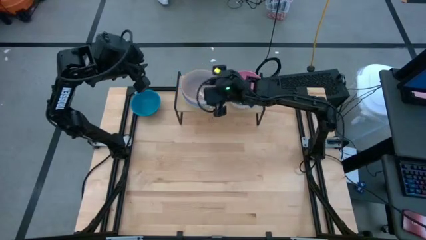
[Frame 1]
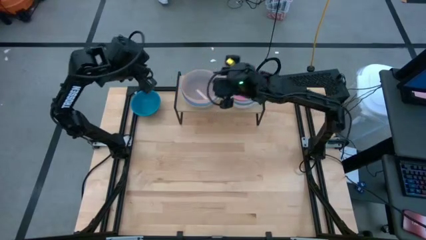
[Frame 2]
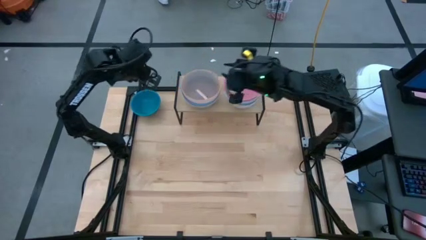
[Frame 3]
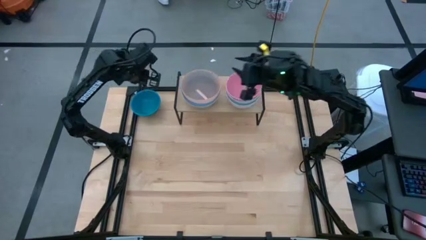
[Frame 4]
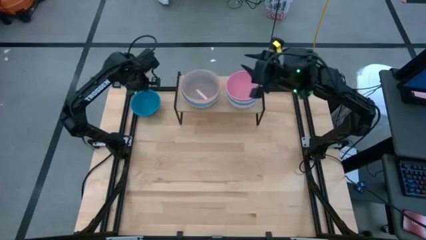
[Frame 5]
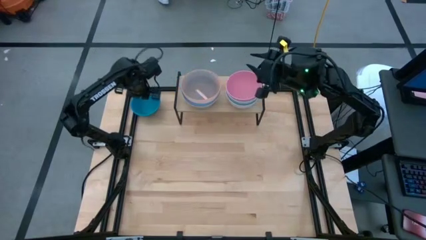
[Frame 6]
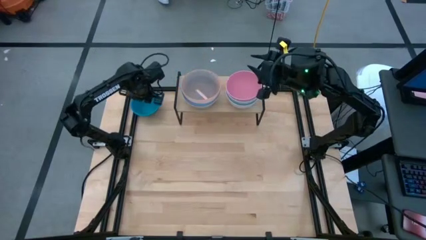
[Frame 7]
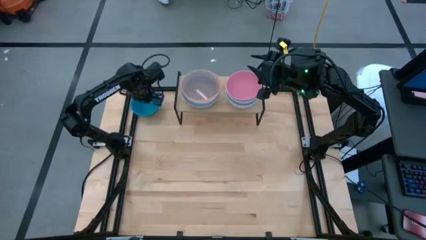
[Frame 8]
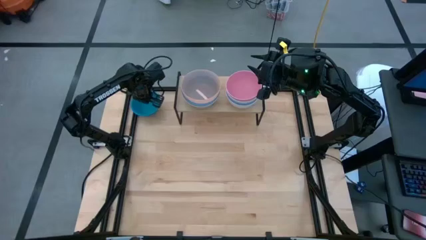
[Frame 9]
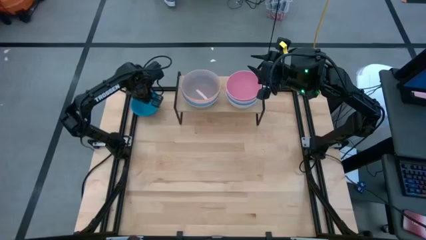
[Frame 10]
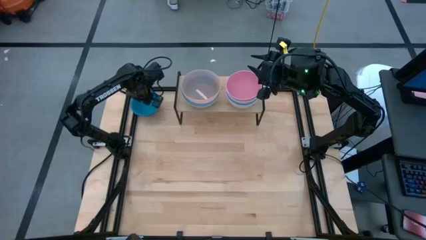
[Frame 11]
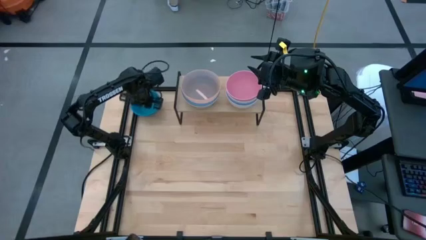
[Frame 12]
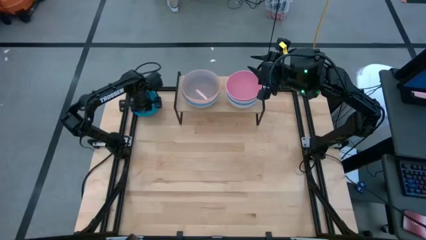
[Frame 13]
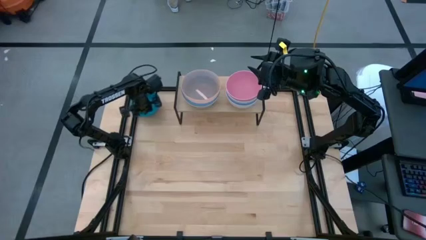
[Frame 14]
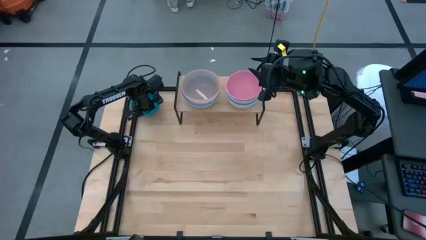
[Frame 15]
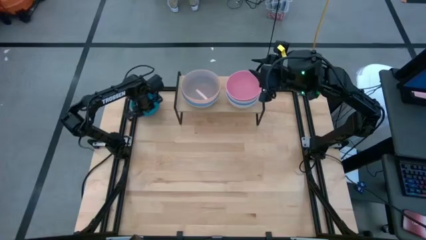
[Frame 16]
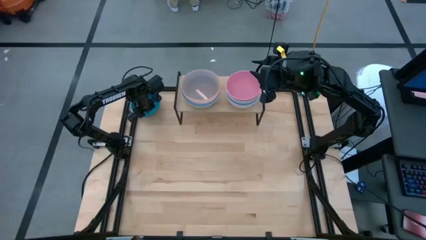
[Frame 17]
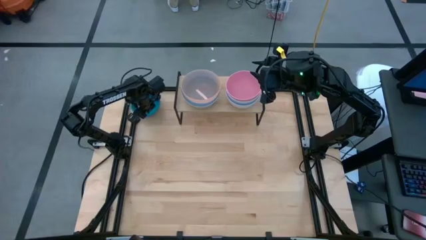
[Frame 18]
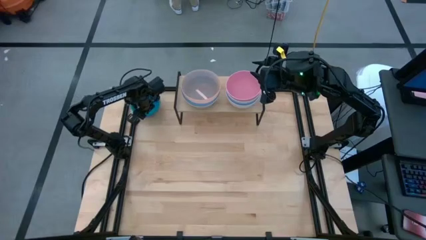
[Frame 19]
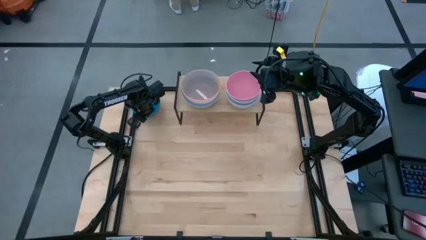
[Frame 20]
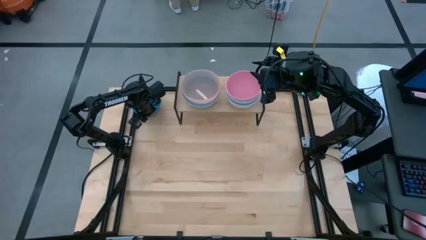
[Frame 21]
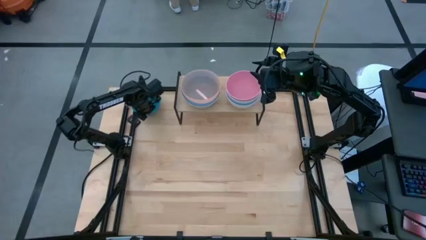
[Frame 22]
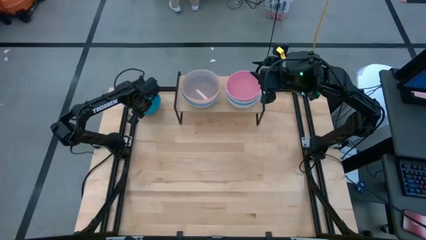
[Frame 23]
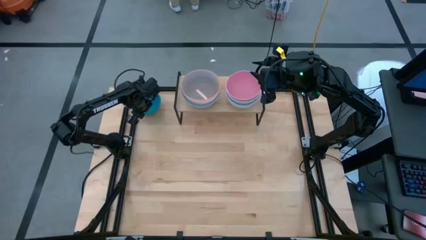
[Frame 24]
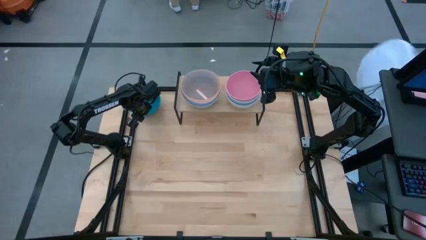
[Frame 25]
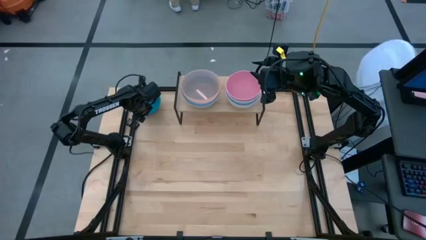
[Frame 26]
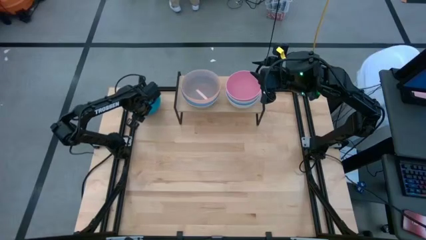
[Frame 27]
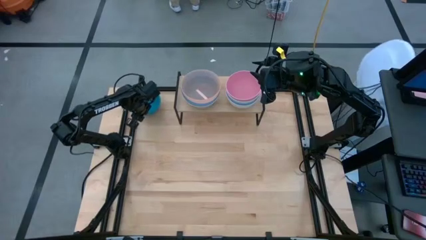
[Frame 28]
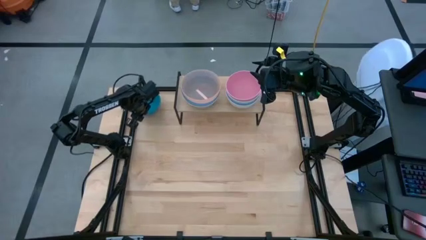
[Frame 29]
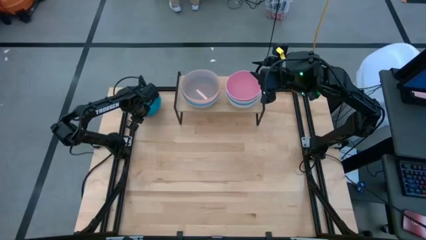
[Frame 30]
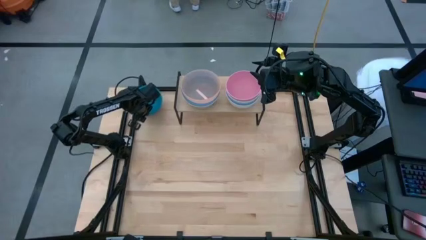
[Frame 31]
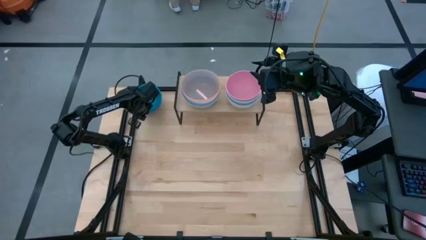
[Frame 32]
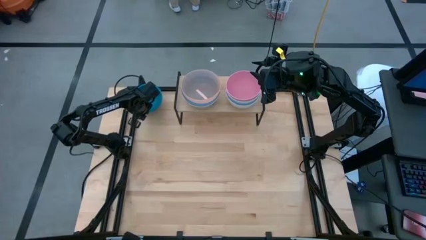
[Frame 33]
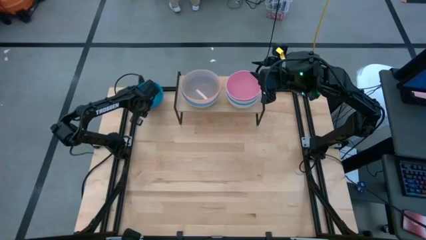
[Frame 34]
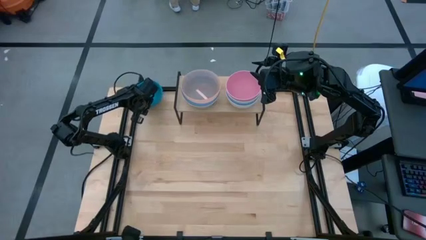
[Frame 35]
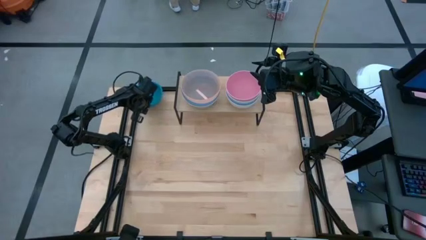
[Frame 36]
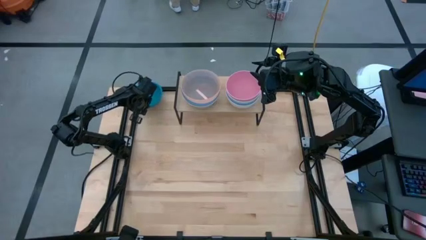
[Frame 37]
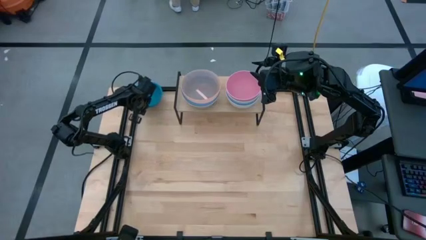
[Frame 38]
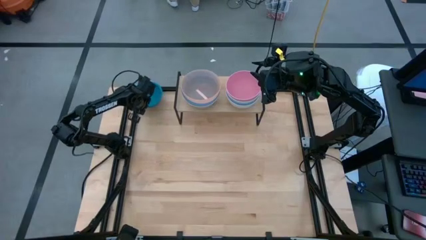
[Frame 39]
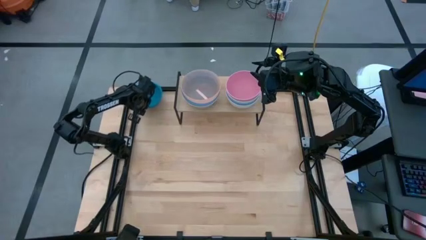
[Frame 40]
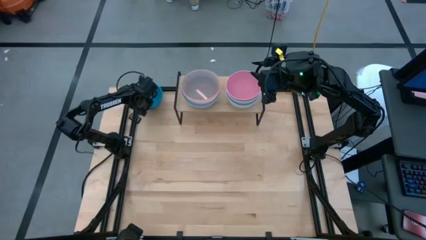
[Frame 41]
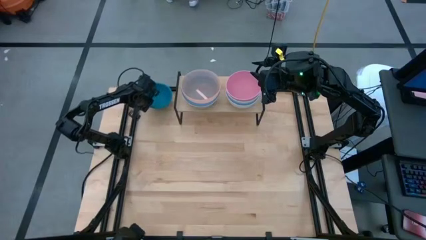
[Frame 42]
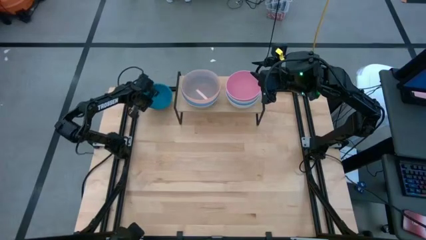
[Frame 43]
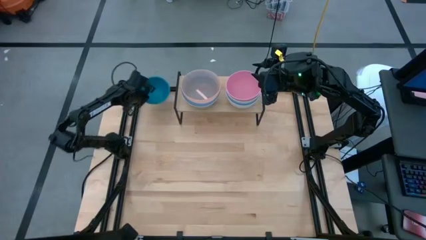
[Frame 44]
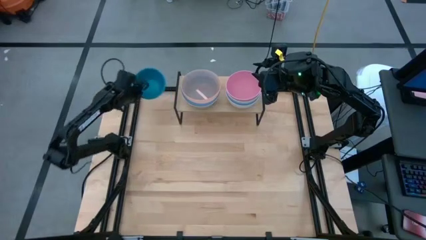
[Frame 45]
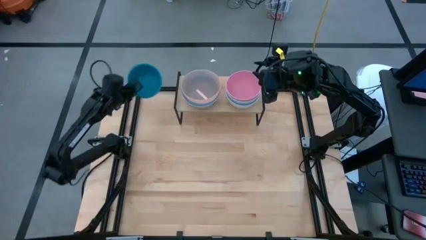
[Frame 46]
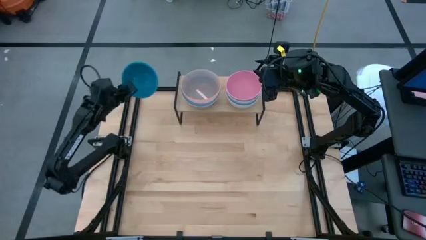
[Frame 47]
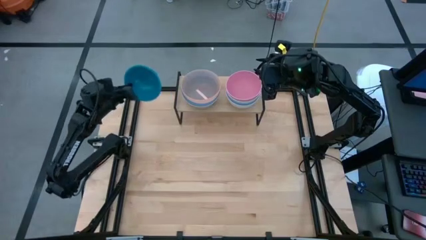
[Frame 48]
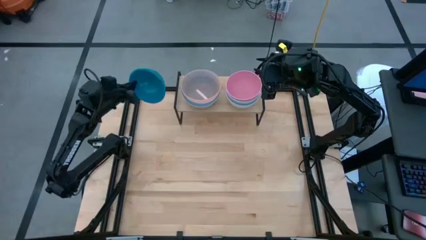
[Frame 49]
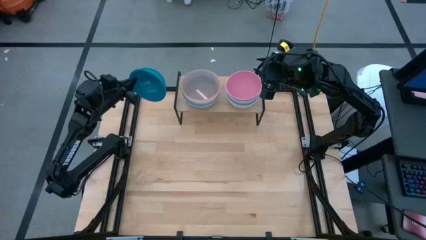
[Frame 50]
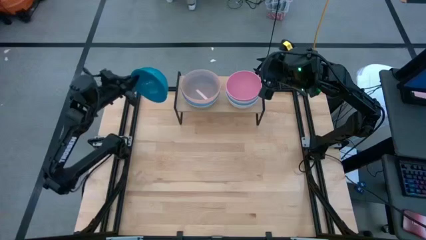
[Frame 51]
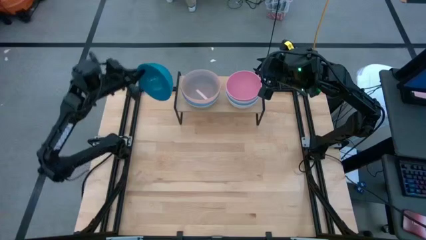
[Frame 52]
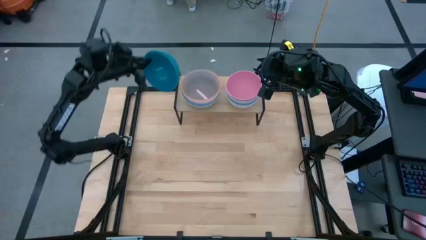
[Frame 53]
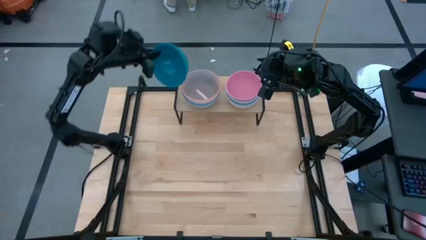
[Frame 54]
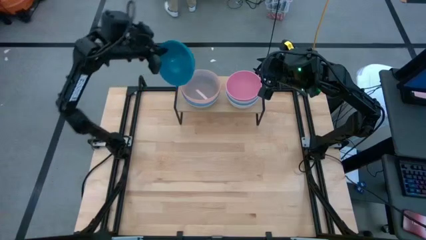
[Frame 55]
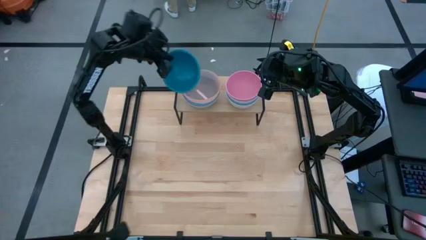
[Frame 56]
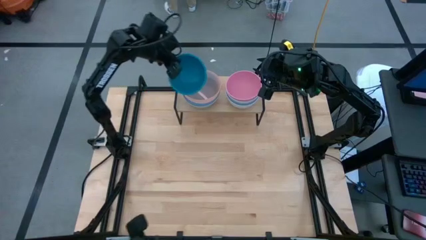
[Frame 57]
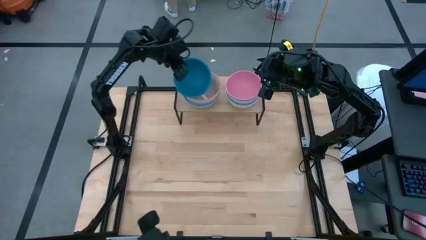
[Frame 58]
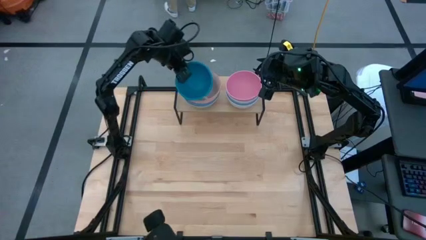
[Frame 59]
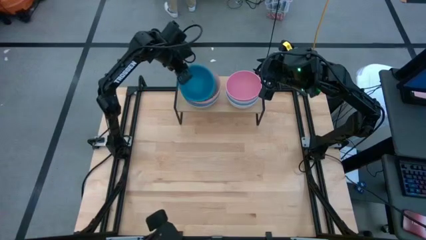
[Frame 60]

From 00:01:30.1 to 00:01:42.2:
Task: Place and stack bowls onto a shelf
Stack the blue bowl on top of the light pink bowl on the shelf

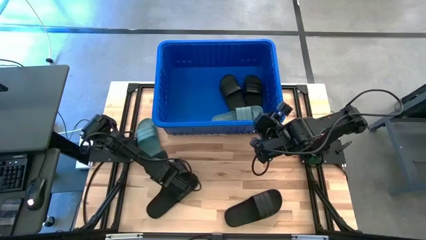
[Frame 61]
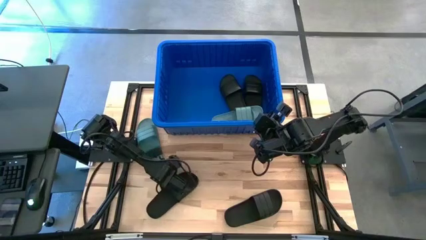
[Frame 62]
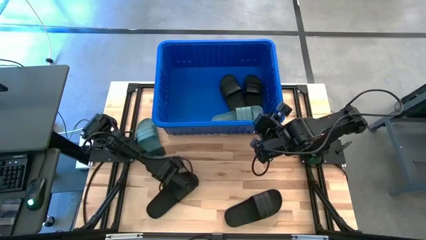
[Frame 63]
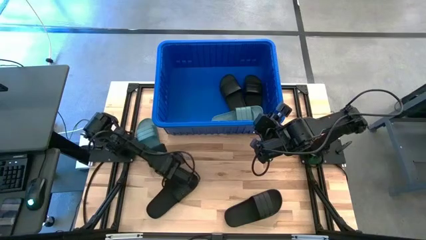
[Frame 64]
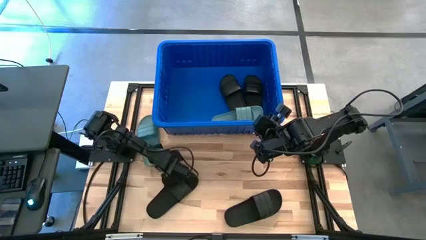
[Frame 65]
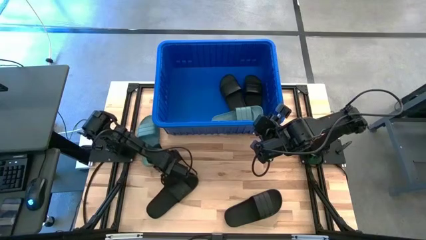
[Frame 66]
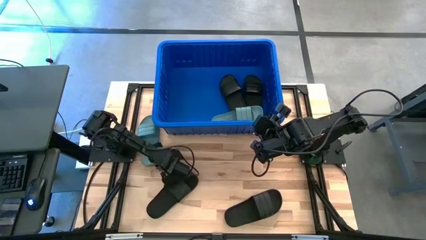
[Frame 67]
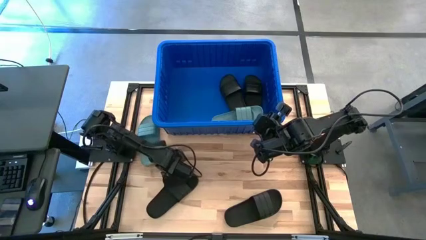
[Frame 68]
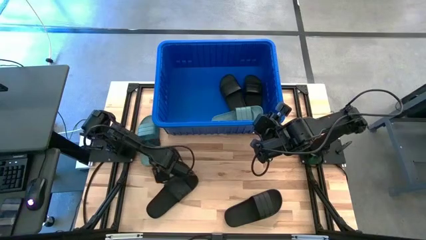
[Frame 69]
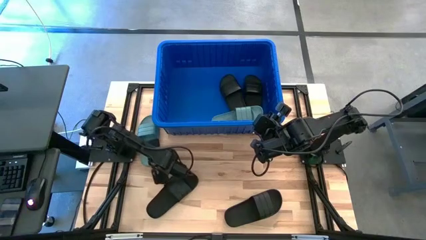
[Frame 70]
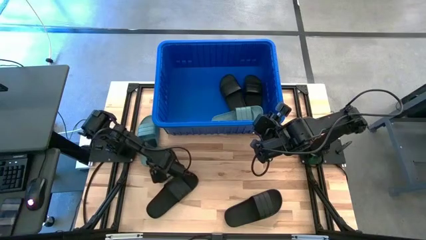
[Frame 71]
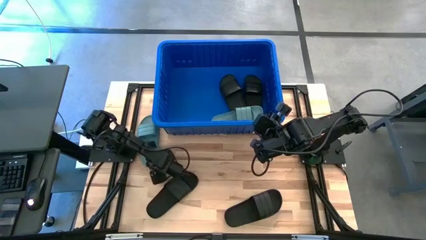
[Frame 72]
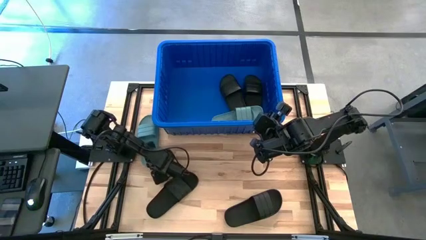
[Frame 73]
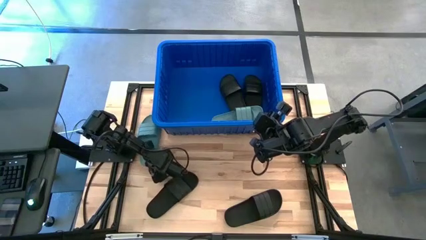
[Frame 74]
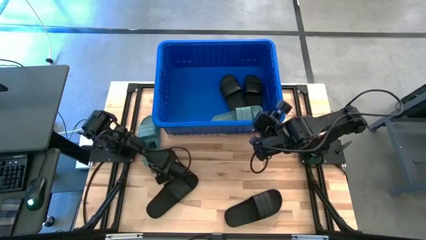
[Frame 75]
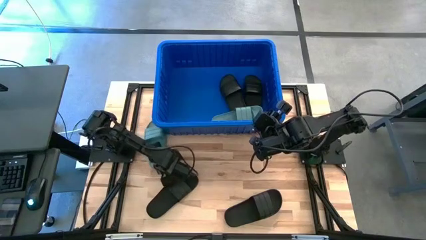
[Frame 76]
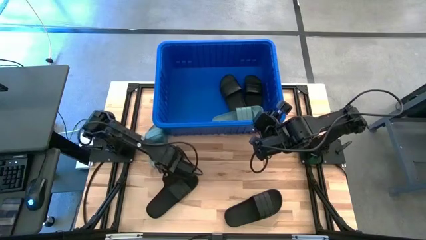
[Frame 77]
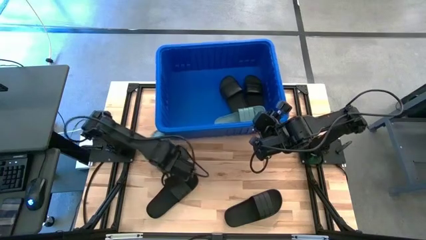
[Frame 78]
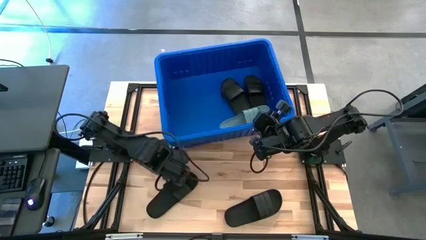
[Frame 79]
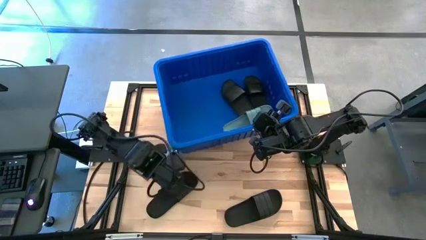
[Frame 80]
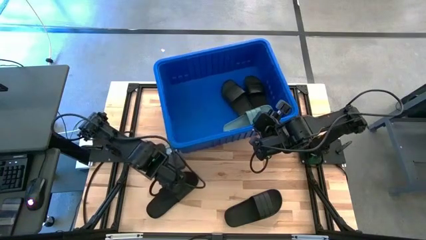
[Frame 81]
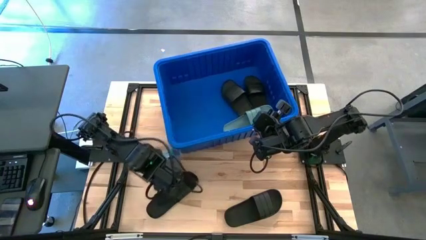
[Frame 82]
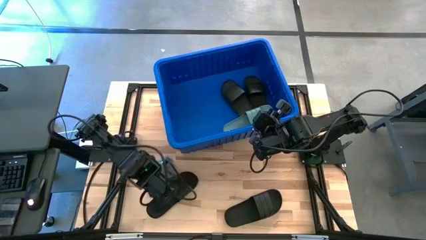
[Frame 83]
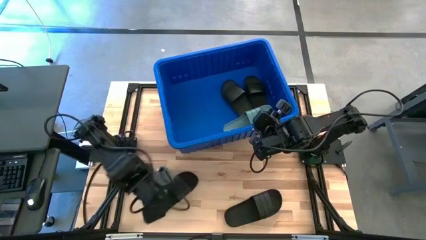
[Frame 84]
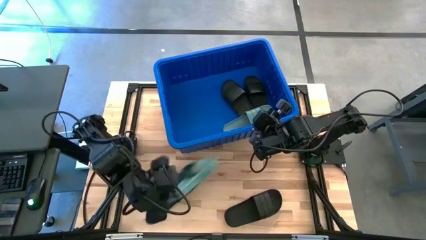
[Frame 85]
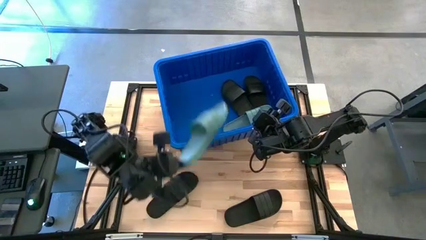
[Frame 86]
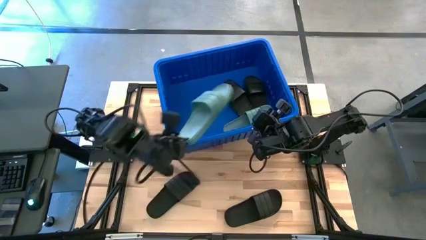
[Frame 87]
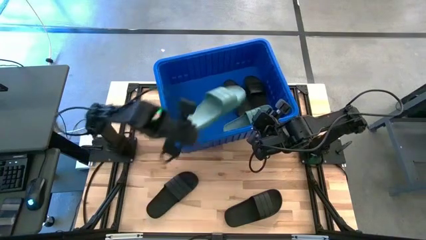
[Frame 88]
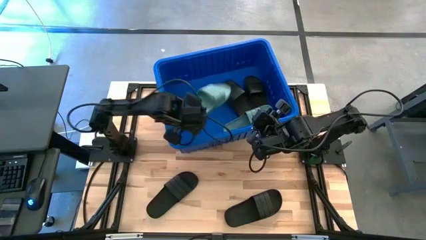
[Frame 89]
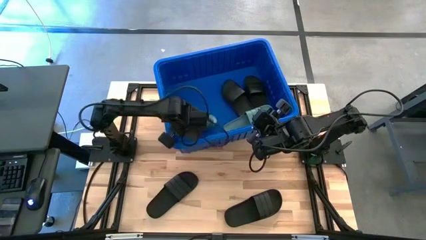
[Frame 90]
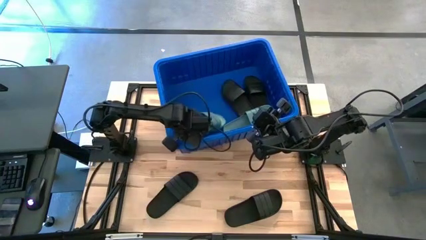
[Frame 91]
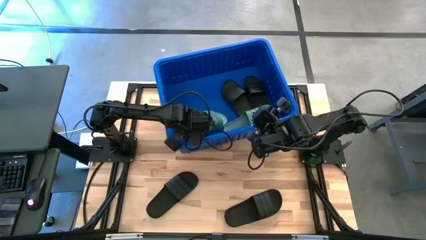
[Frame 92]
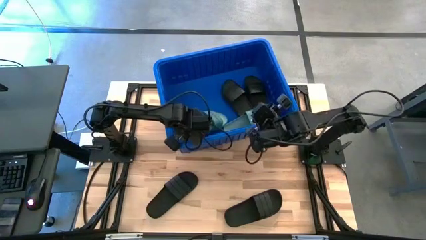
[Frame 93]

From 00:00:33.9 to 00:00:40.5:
Task: Pick and place slides into bin
Put the green slide into the blue bin
